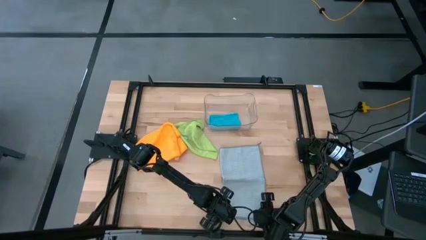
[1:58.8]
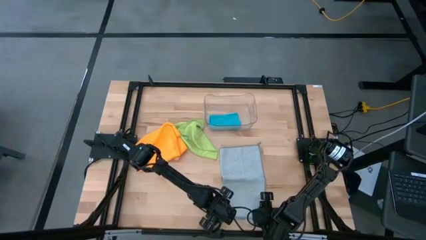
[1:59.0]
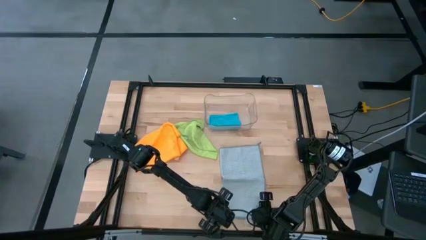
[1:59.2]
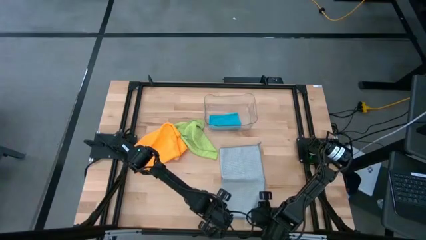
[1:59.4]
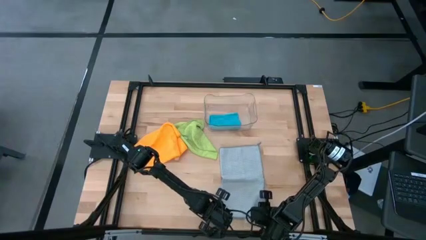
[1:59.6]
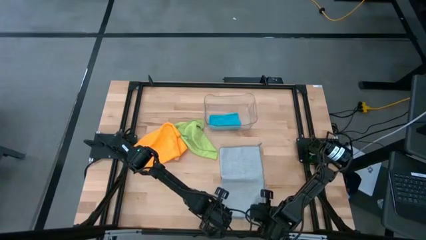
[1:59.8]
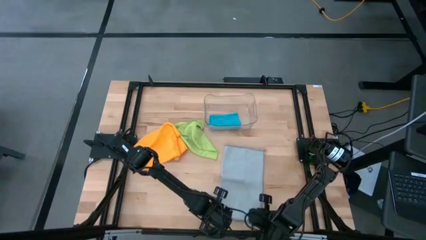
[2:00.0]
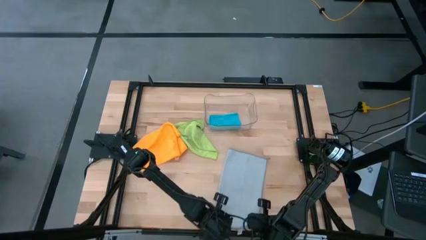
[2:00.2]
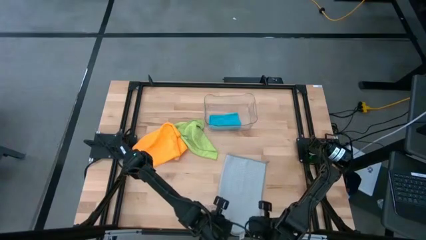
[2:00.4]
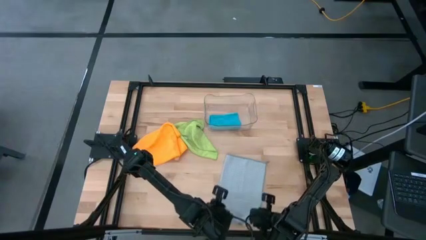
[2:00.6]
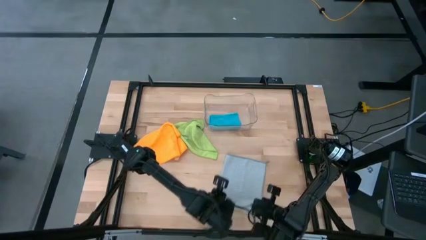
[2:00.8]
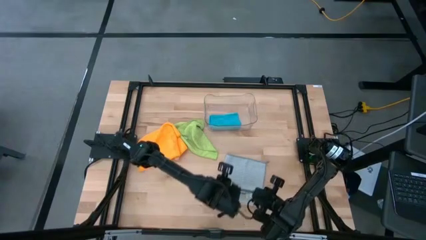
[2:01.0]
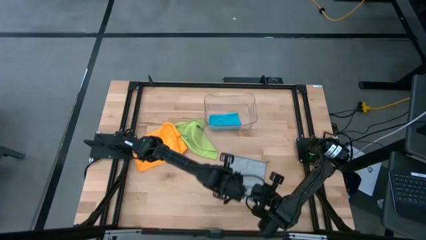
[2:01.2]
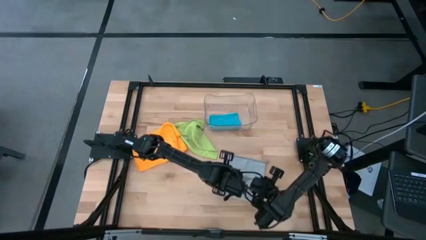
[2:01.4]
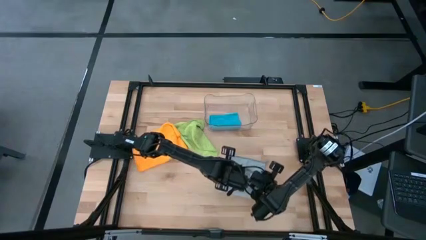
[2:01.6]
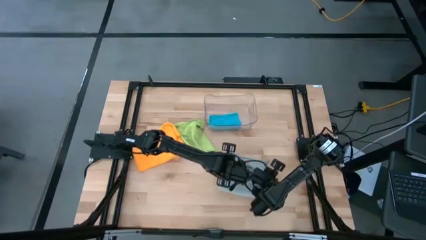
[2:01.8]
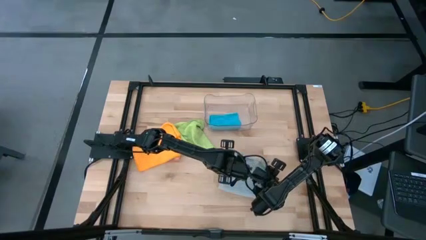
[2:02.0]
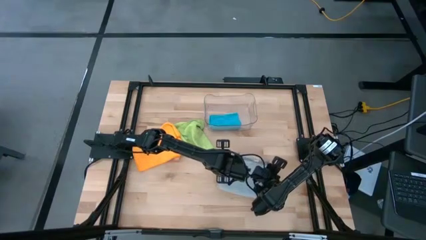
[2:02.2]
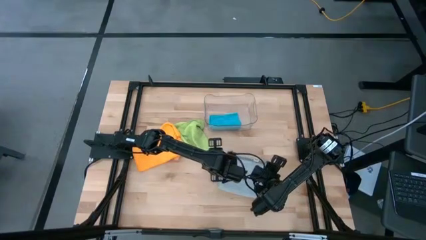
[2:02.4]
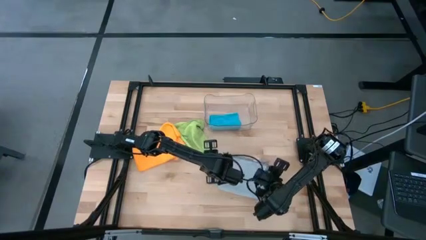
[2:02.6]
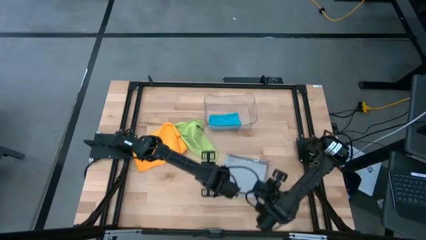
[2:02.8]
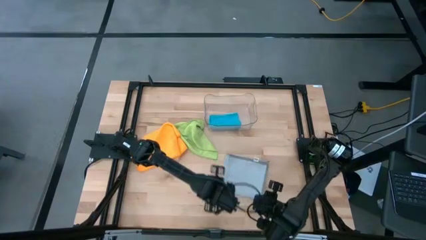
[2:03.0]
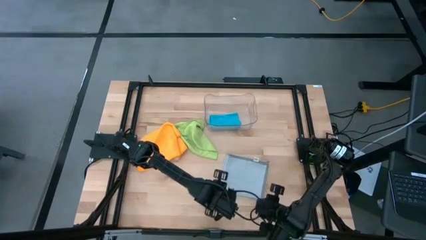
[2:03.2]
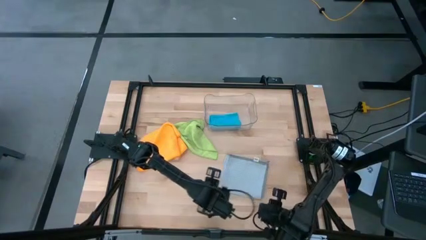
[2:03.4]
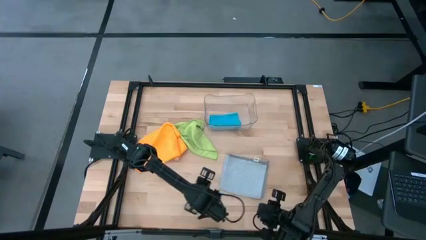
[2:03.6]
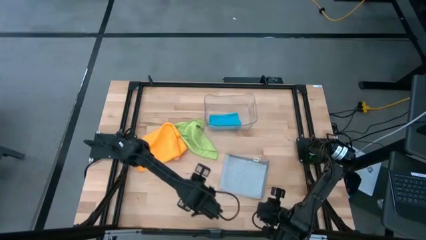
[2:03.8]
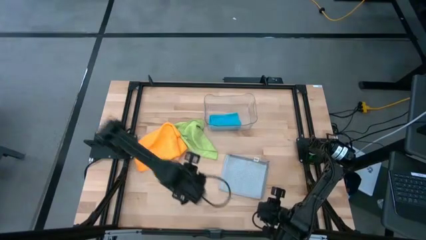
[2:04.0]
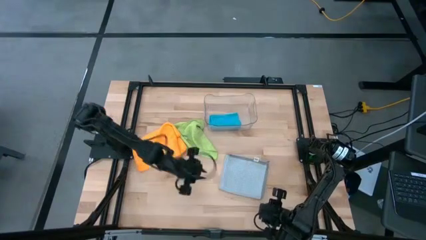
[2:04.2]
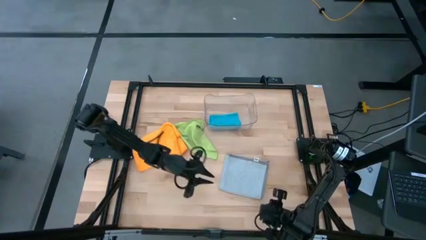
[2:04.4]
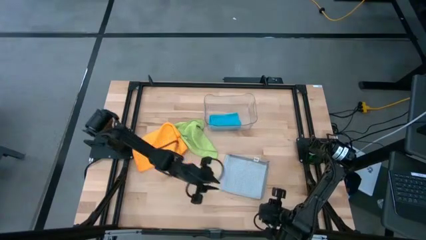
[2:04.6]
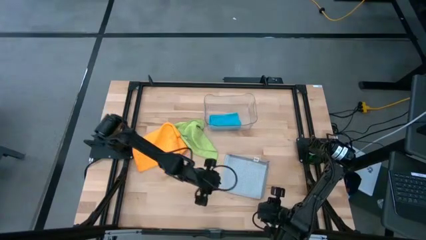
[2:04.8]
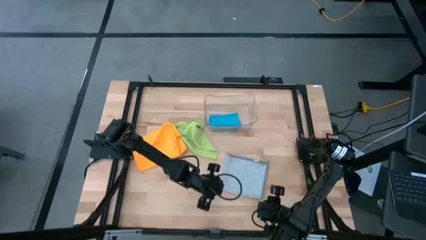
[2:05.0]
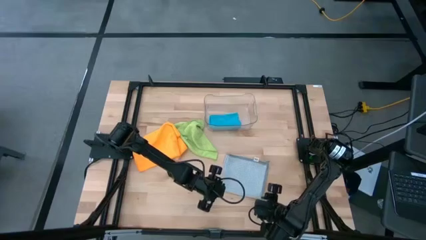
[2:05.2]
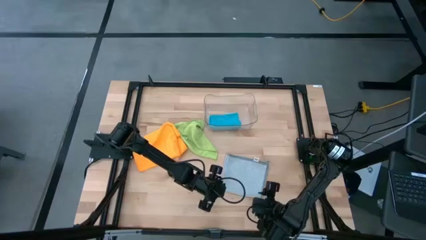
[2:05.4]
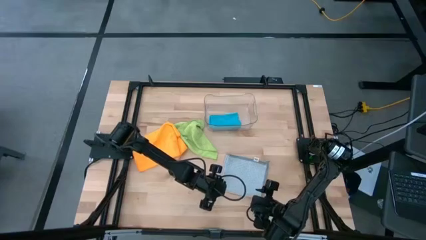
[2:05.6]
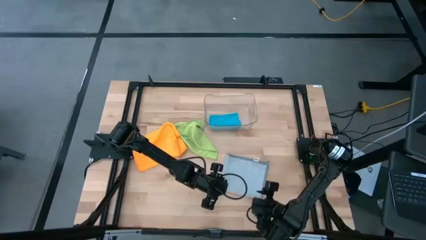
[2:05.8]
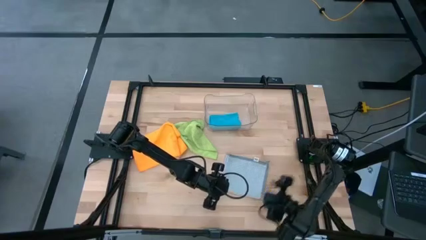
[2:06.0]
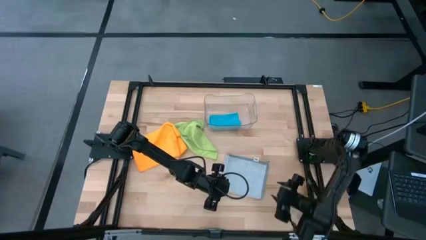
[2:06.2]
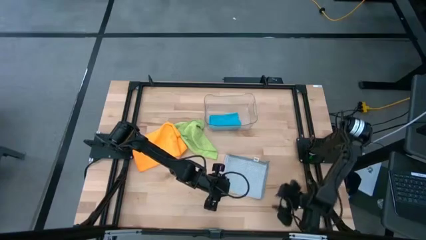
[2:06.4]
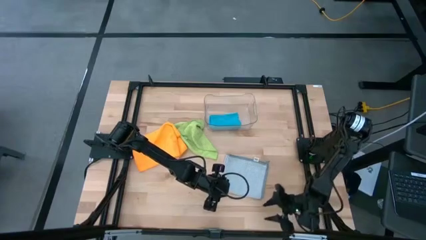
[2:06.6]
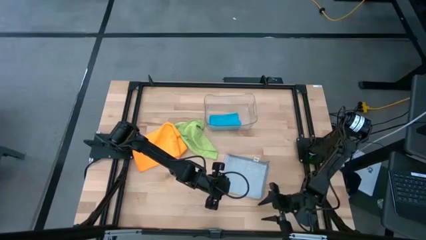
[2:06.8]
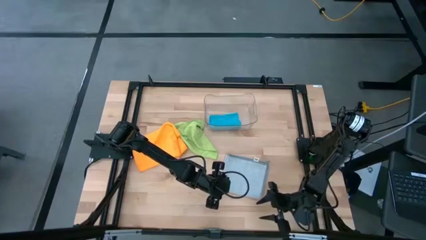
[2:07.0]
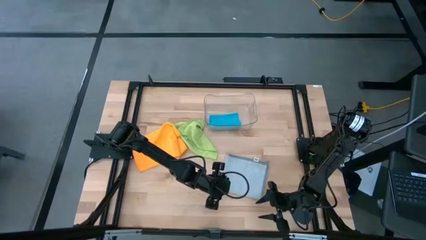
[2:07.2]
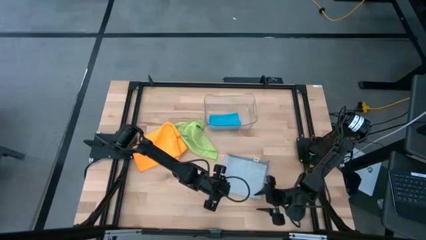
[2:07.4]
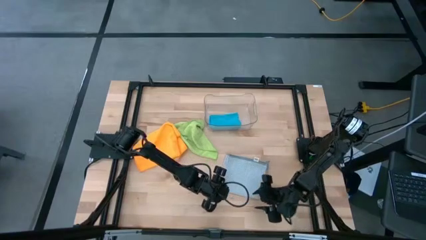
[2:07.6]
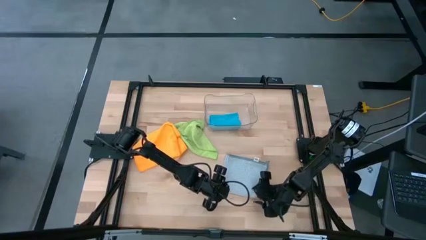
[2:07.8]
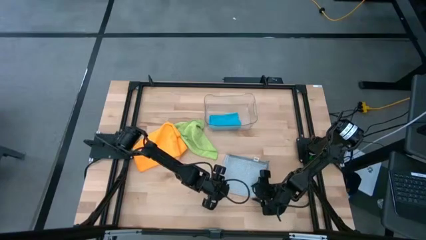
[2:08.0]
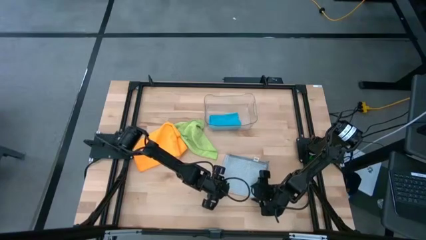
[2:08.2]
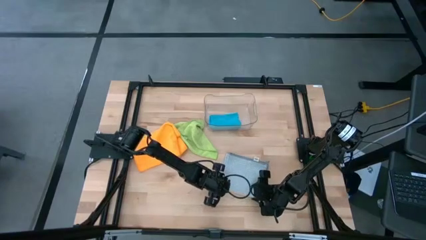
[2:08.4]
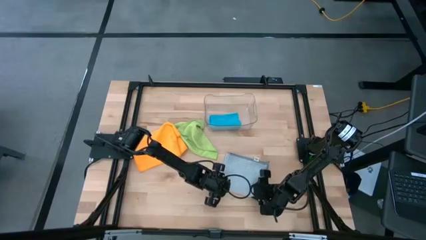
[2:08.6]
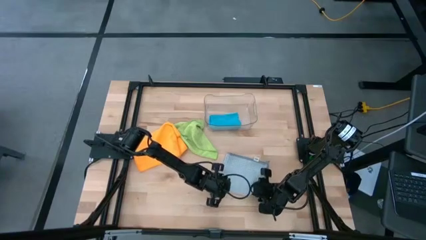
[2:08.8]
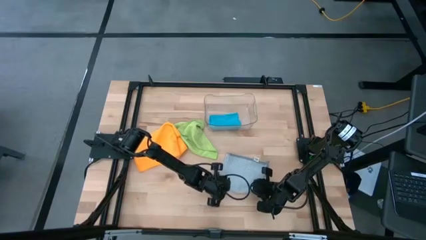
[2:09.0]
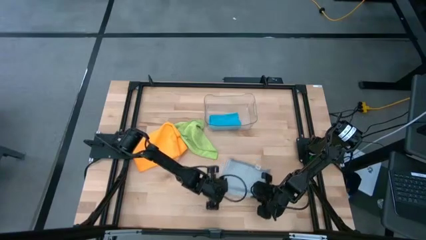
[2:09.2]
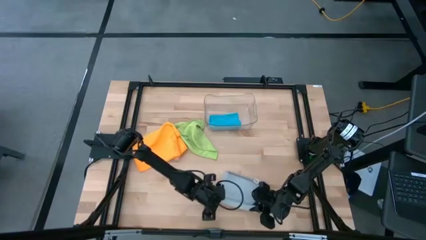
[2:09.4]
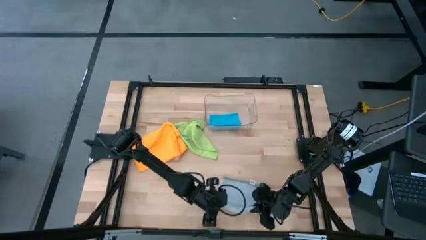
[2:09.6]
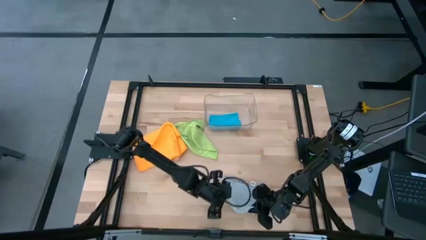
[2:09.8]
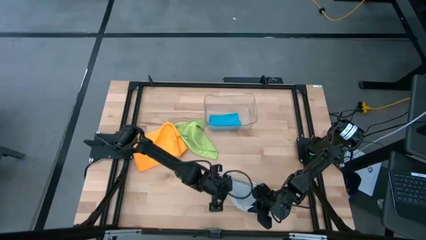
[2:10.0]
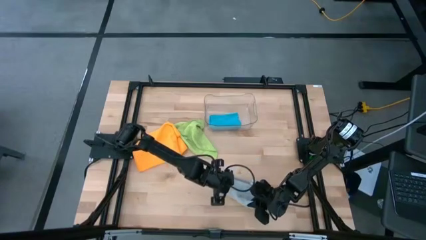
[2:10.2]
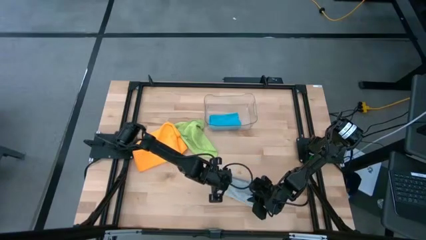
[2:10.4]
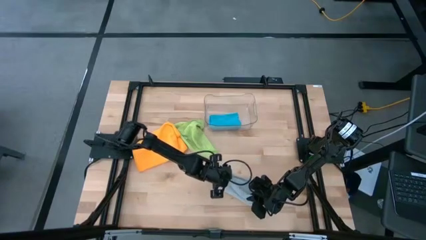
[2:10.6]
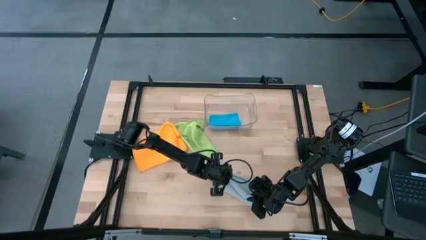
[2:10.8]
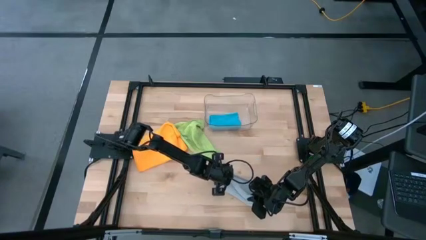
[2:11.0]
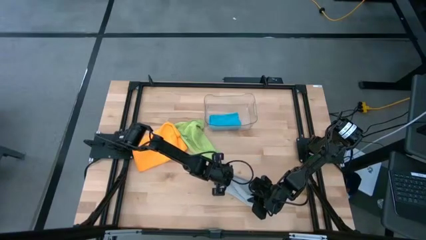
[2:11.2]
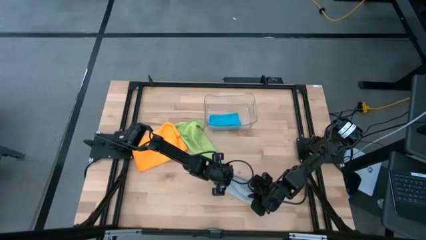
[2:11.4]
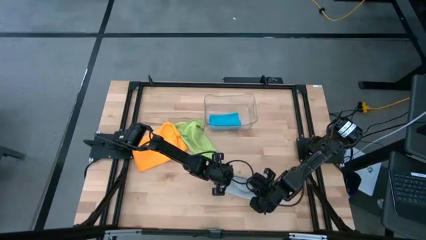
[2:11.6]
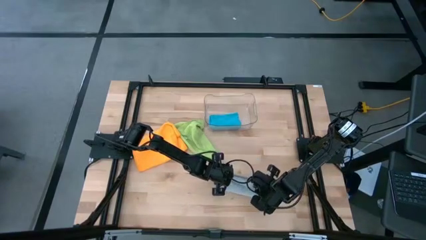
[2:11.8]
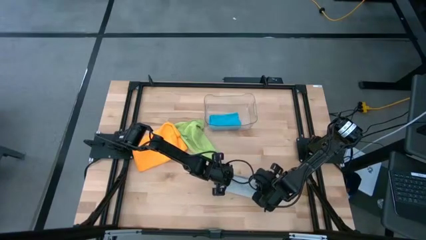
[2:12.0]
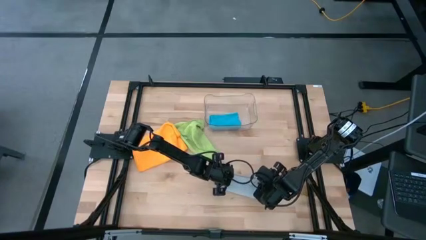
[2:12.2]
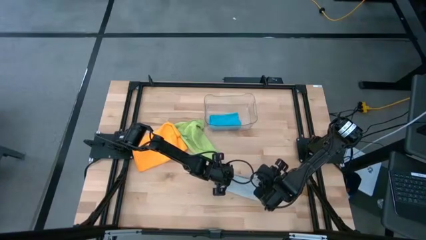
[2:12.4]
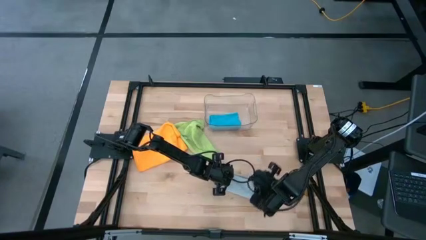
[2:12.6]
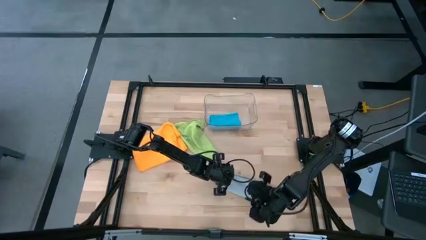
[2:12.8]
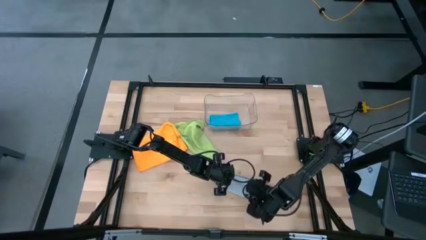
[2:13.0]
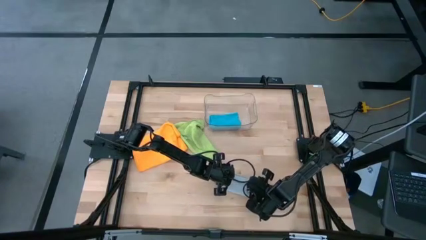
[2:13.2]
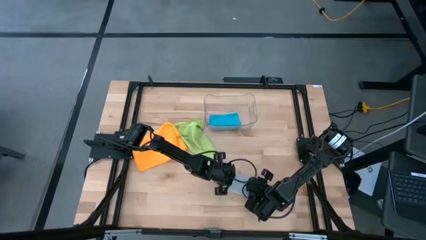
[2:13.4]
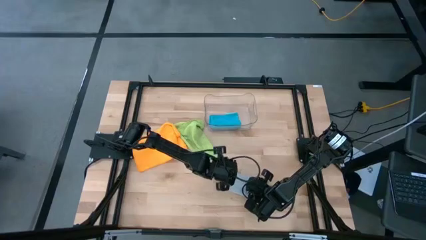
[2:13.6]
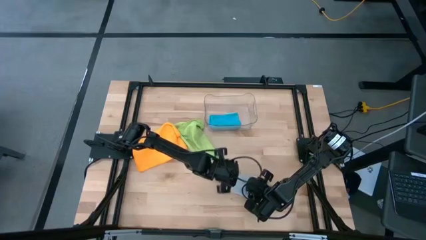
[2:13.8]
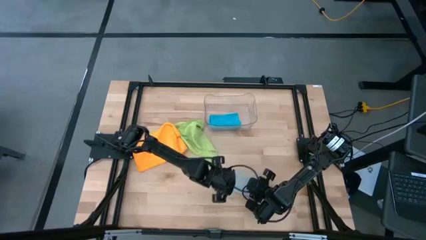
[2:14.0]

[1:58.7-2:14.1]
Task: Fold microfiber towels
Fold the gray towel

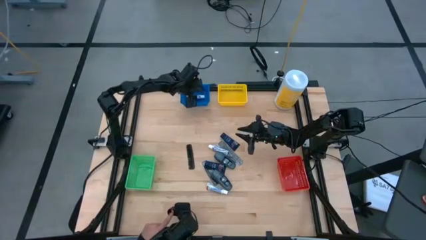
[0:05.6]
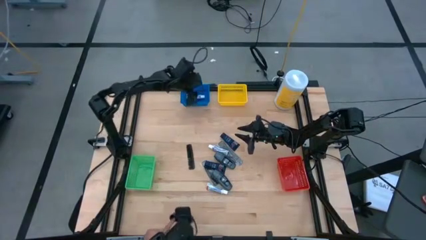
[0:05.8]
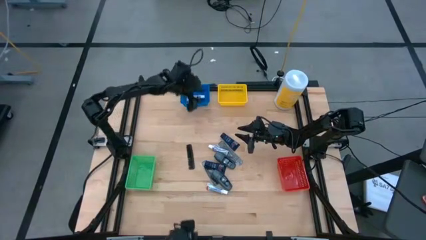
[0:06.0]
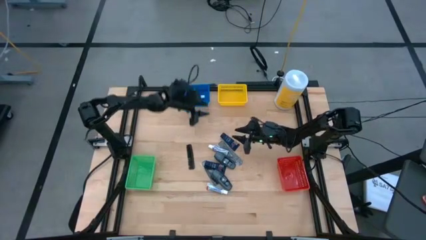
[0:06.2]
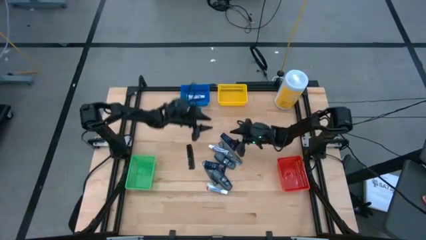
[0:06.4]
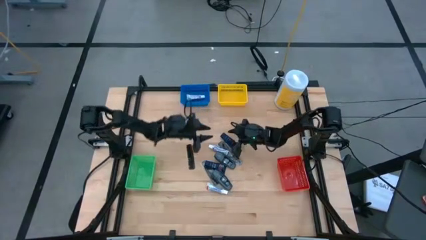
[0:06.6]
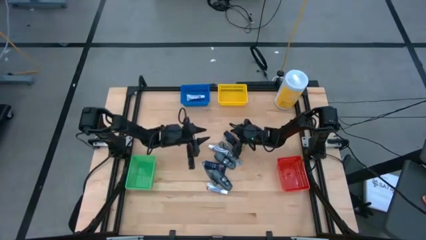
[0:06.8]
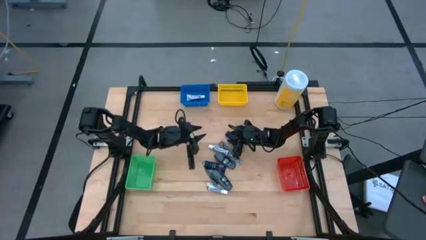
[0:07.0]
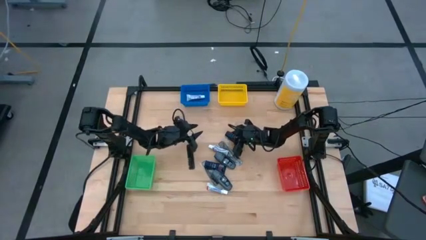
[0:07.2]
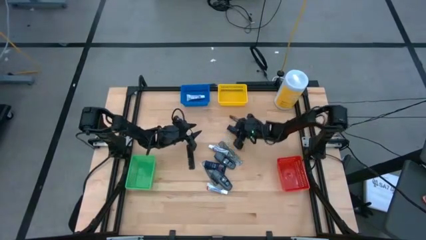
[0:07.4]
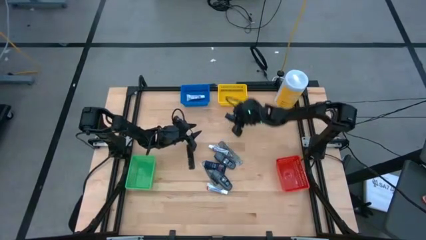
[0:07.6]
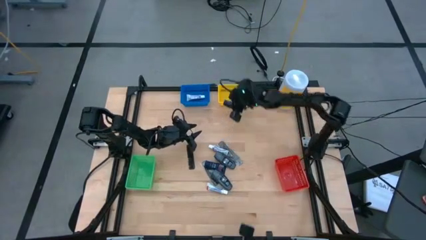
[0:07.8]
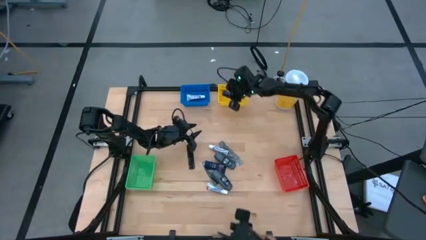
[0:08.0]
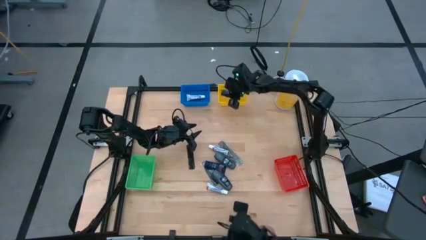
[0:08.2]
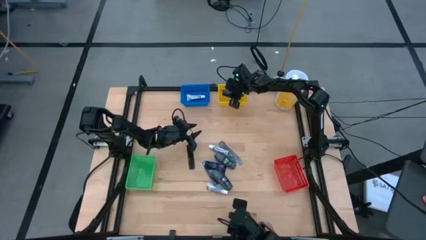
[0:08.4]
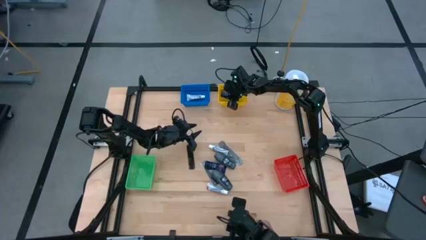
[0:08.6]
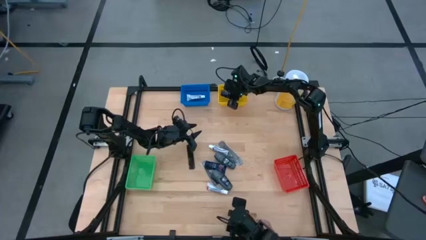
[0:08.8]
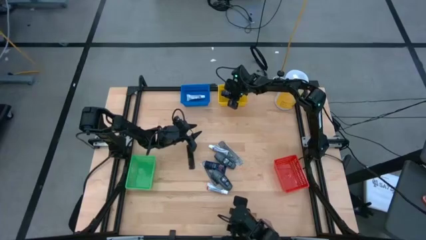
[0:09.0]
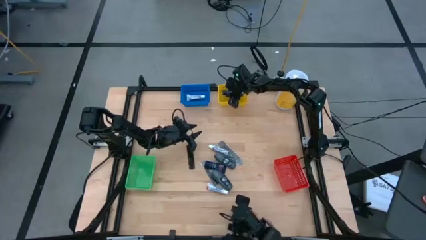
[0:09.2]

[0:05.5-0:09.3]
Task: Pick & Place Travel size toiletries
Put the blue shaving cream into the yellow bin
